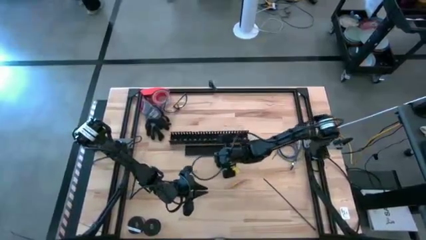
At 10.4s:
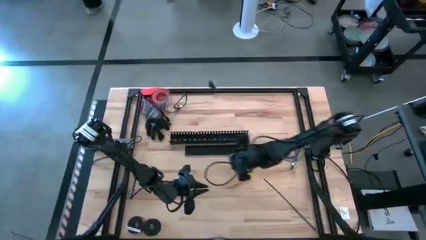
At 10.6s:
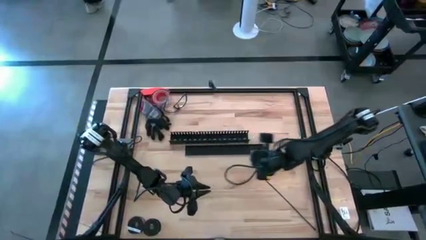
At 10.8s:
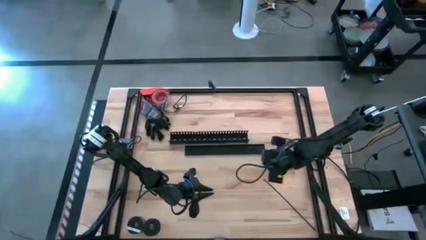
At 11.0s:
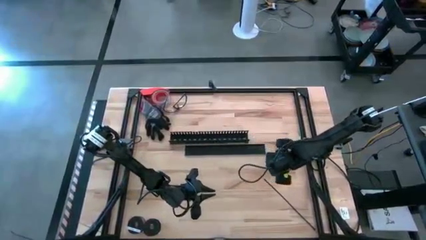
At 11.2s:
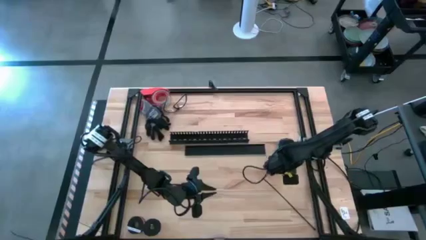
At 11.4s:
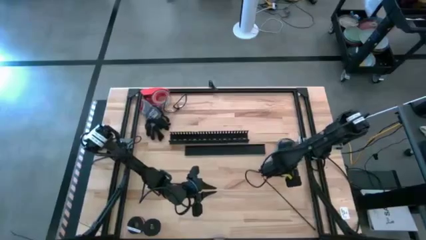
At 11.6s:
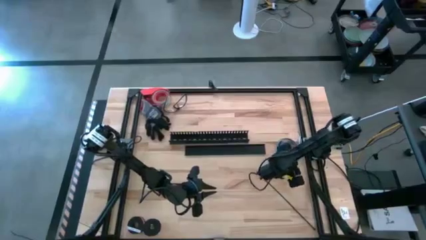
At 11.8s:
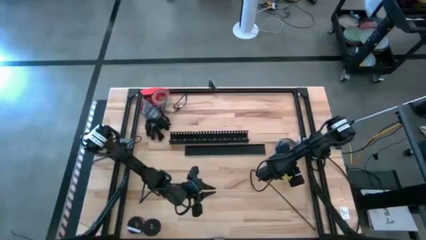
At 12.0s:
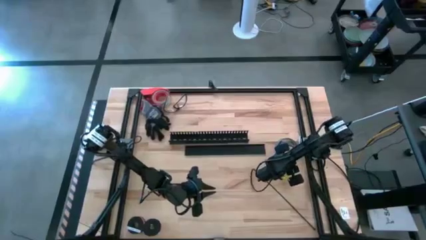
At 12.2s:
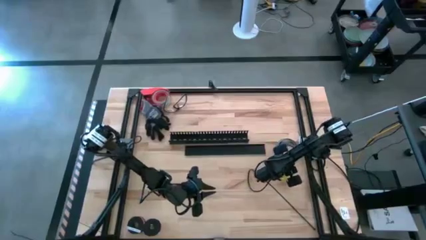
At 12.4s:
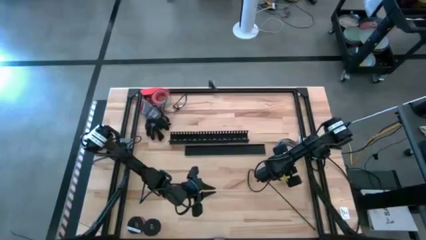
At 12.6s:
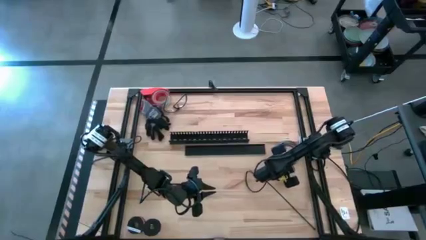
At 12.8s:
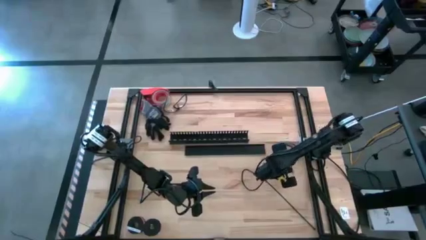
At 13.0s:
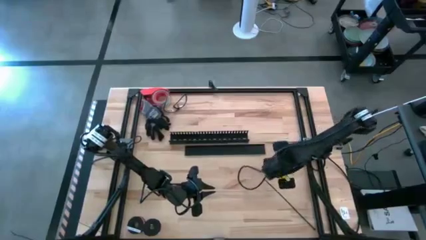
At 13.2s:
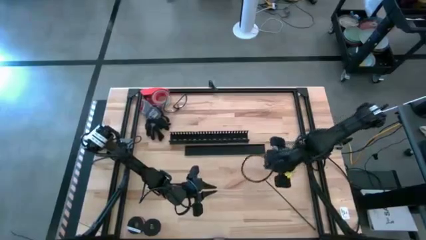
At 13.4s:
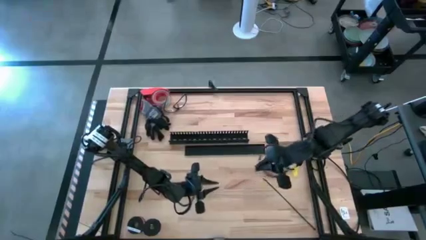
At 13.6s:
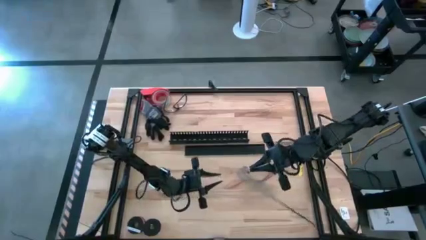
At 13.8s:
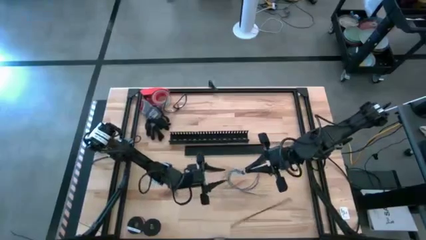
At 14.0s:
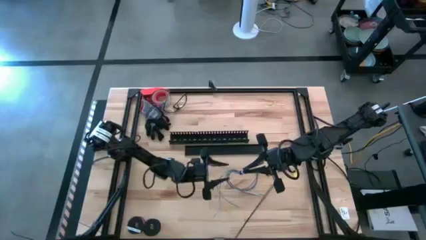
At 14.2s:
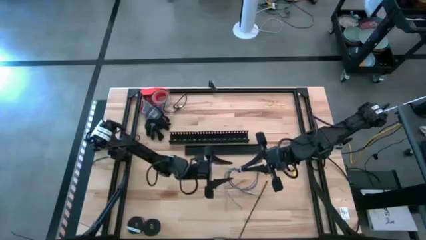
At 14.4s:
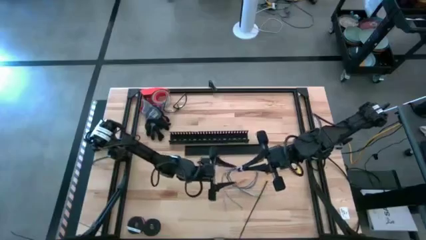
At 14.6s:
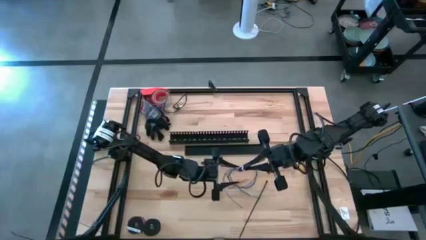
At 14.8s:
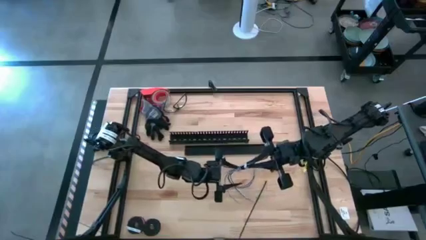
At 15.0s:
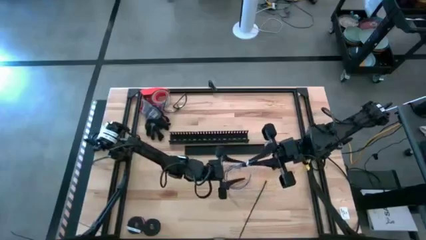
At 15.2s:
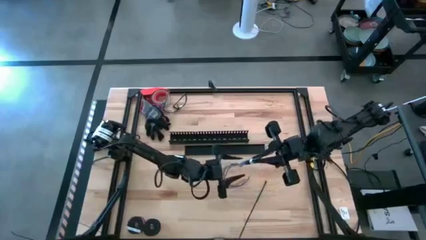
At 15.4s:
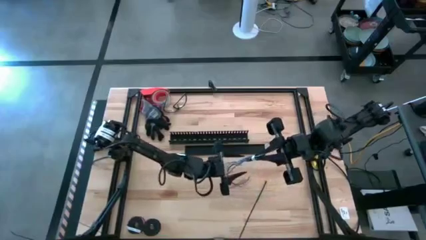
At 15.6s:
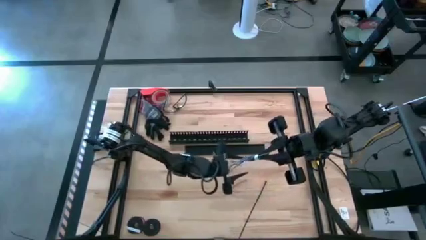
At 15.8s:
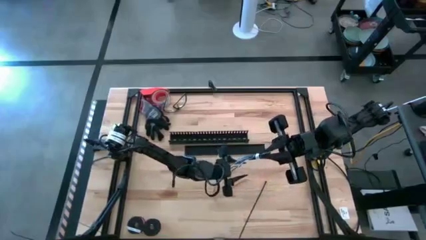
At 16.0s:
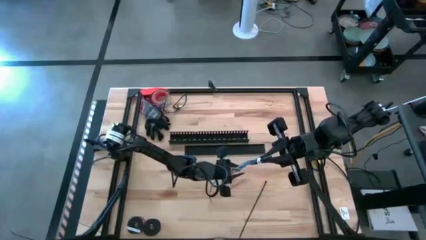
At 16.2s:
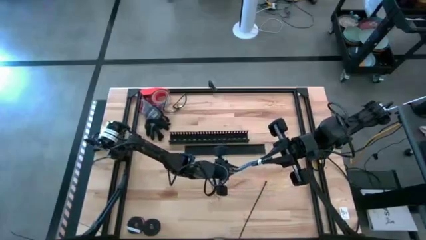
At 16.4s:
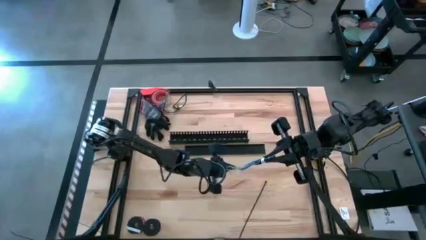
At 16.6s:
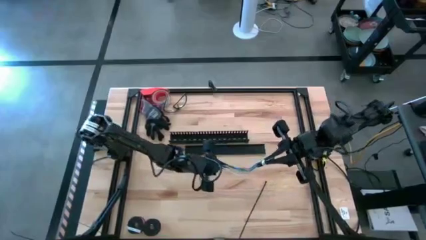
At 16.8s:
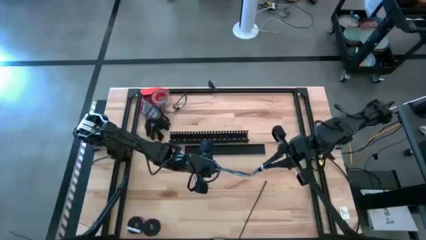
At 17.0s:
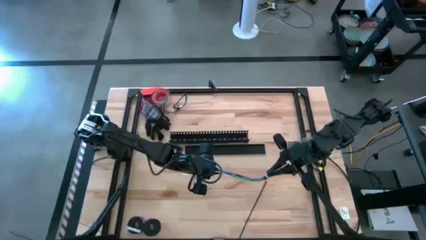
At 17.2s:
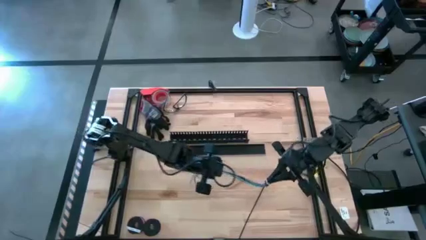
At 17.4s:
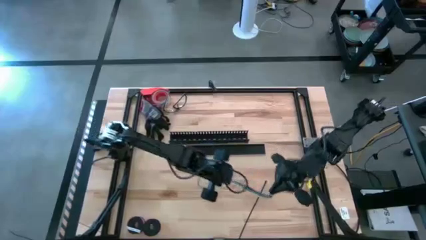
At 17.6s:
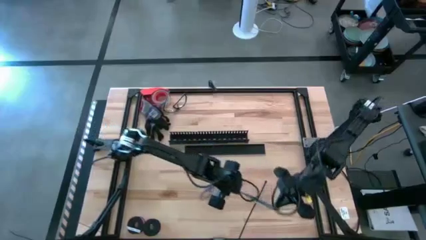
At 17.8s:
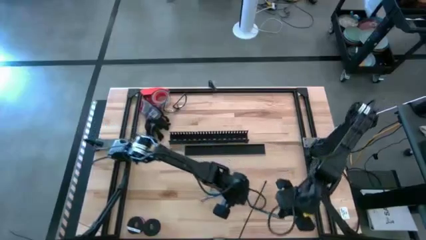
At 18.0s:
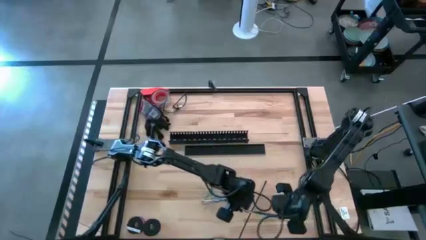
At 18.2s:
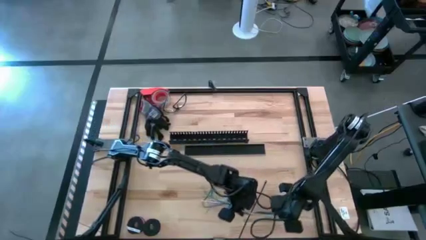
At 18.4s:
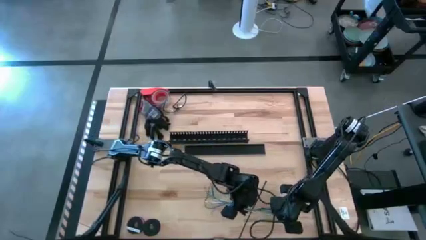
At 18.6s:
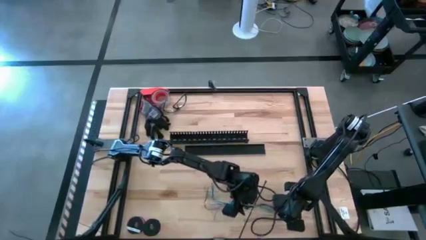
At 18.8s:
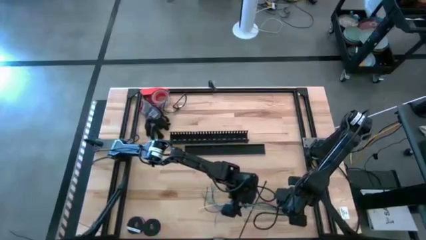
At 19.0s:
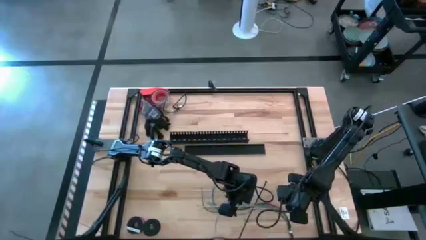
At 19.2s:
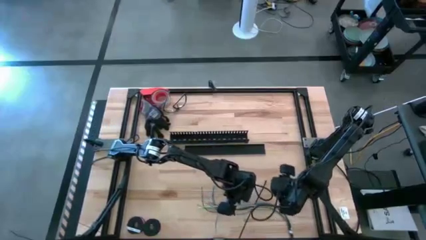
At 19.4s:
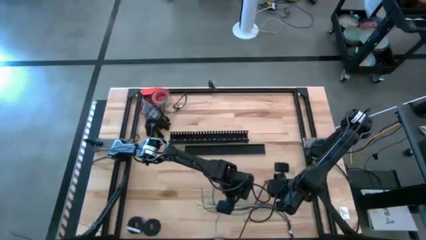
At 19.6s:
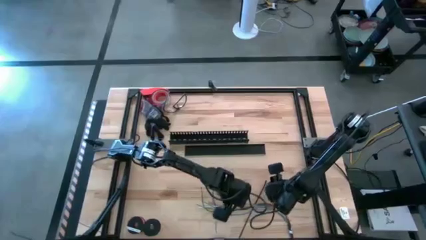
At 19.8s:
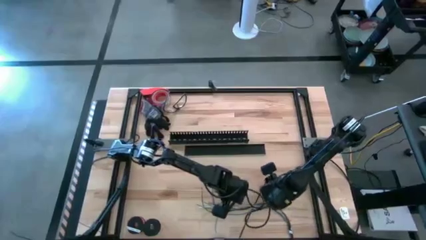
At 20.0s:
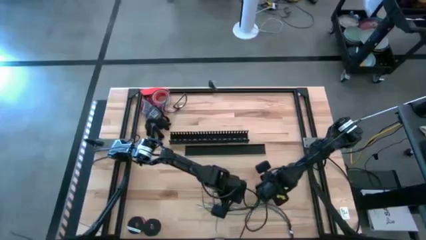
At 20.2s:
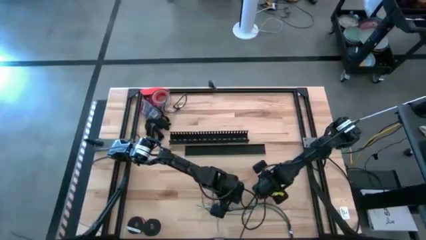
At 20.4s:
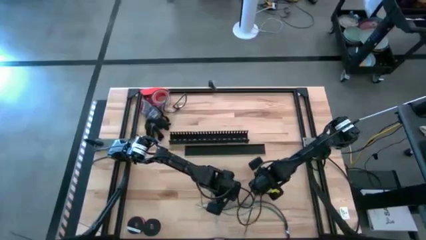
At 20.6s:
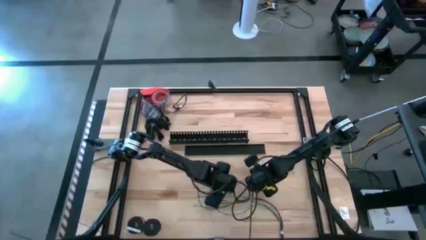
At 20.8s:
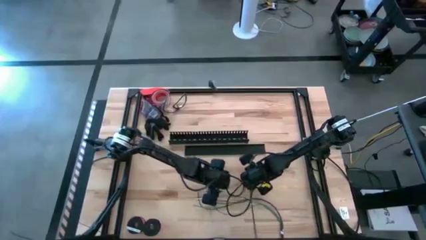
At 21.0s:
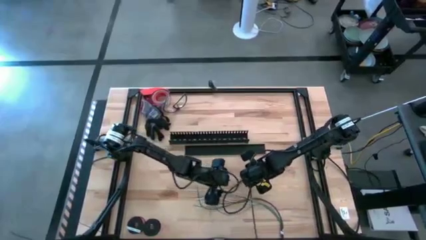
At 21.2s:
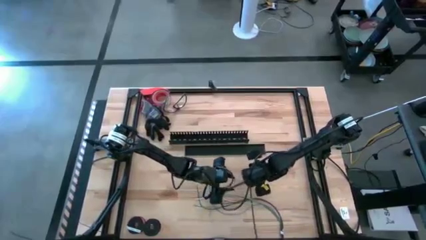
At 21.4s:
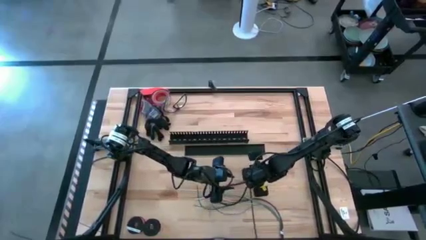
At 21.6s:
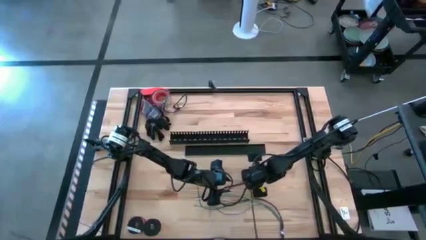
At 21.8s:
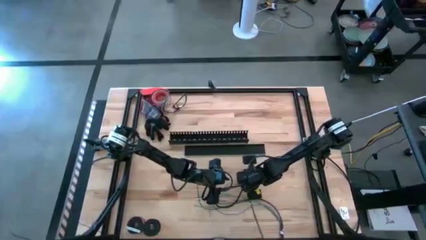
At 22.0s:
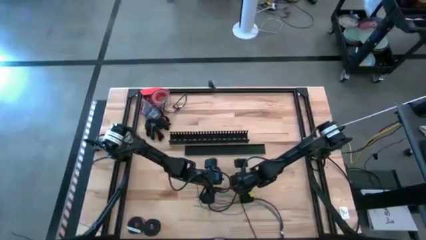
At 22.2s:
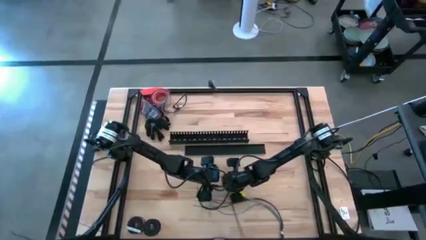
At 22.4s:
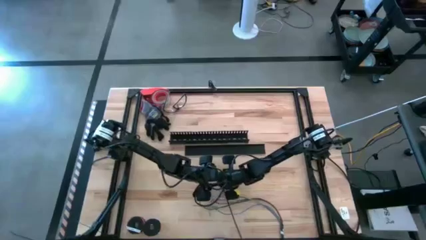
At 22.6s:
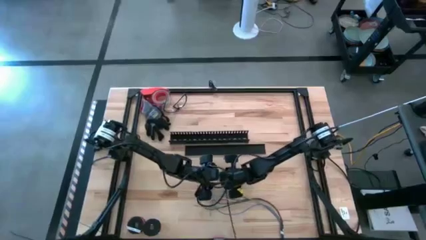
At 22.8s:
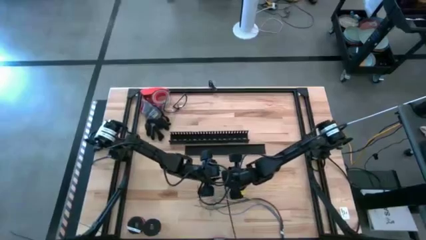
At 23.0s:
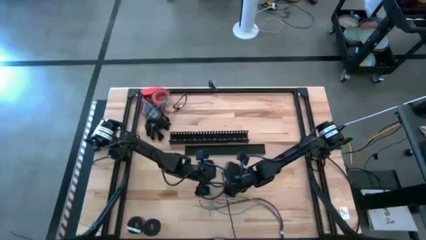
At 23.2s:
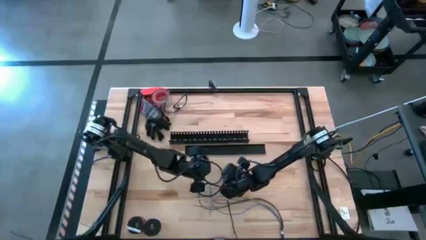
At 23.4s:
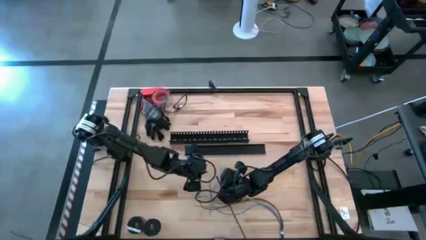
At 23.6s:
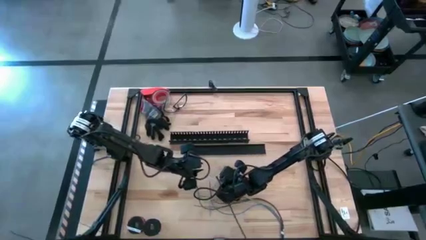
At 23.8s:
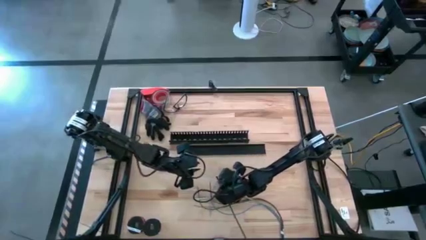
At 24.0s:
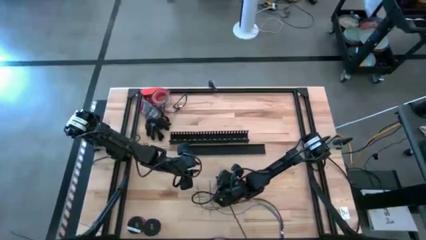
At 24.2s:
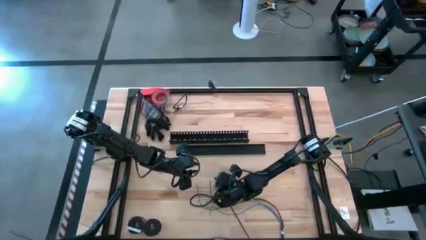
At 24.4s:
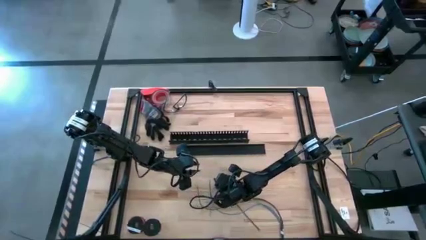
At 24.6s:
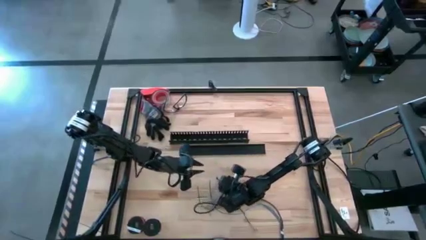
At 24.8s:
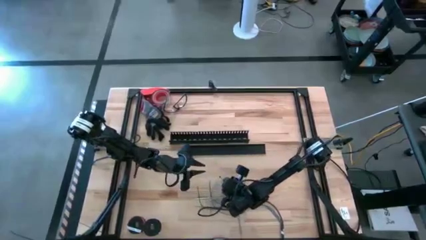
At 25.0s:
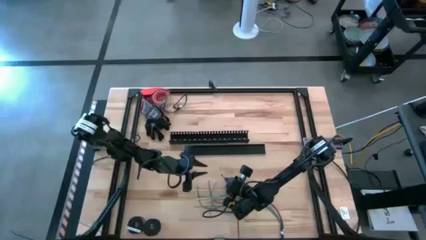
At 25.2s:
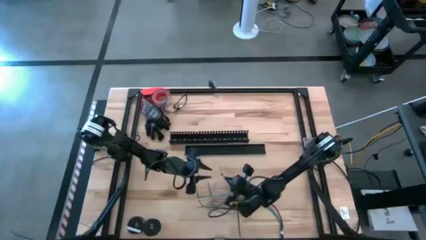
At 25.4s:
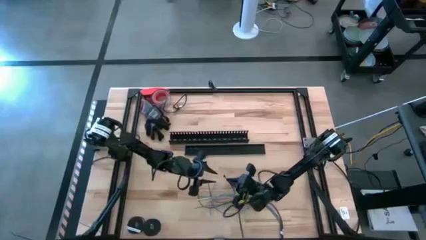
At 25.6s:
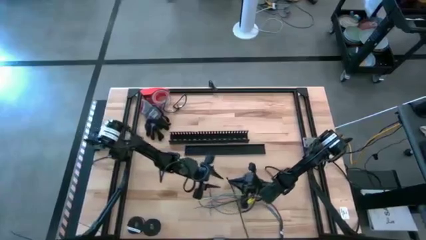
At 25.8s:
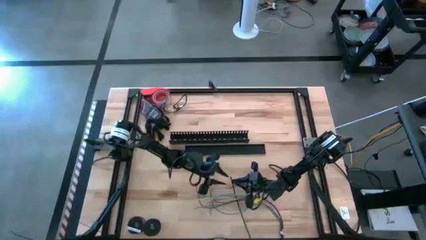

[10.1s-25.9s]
Task: Ziptie cables
Wrap the cable wires with the black zip tie

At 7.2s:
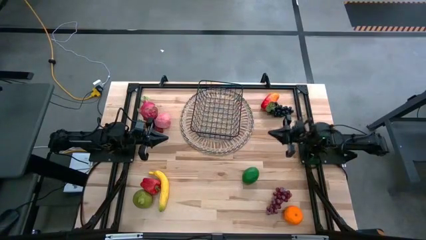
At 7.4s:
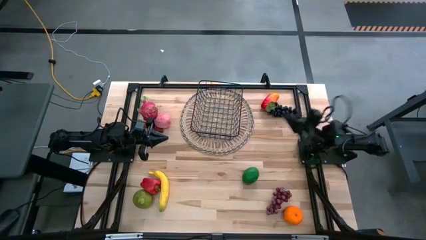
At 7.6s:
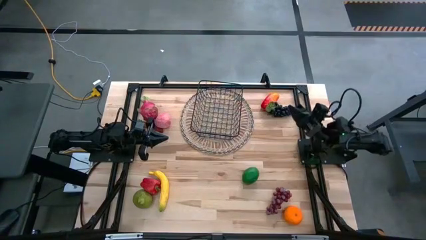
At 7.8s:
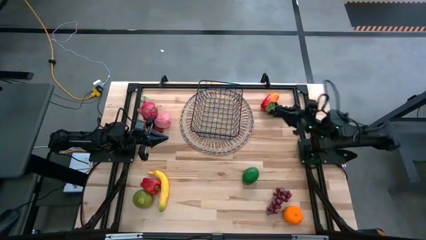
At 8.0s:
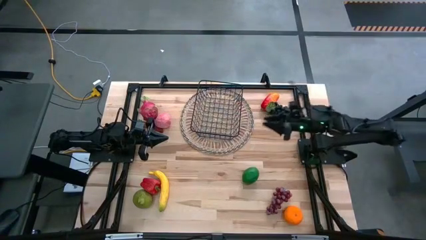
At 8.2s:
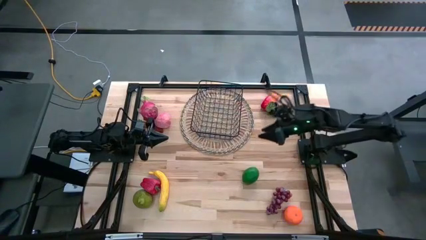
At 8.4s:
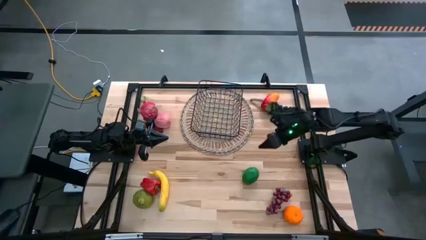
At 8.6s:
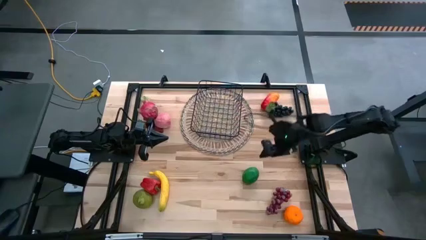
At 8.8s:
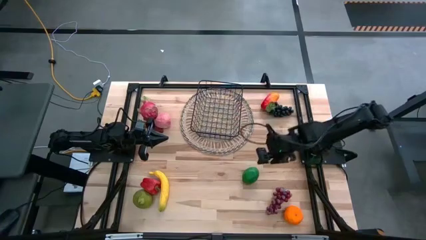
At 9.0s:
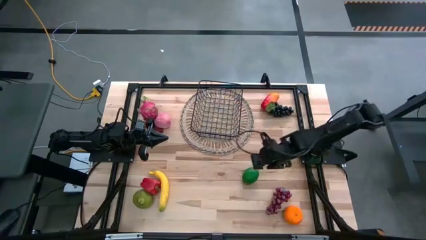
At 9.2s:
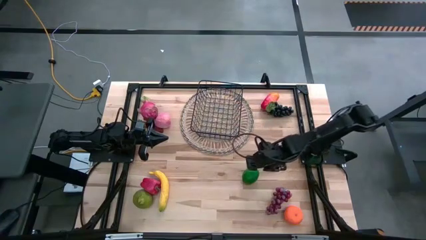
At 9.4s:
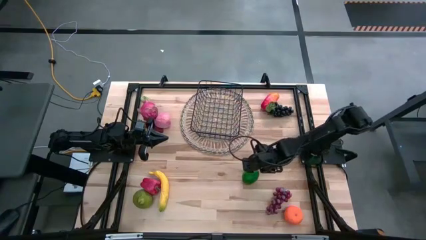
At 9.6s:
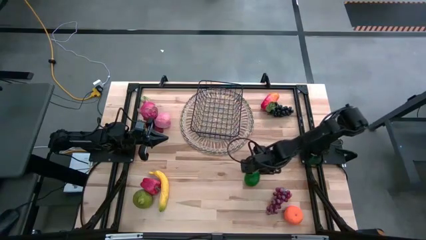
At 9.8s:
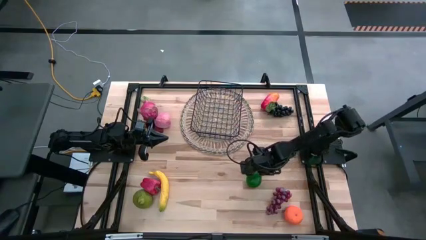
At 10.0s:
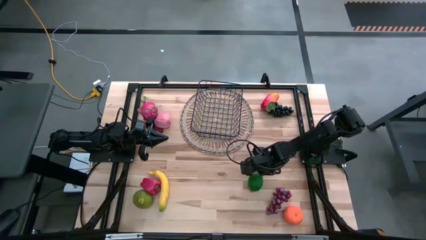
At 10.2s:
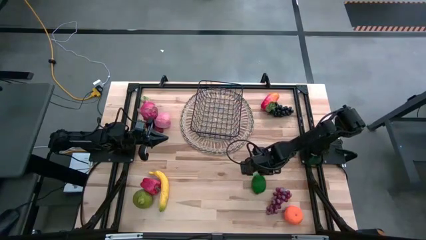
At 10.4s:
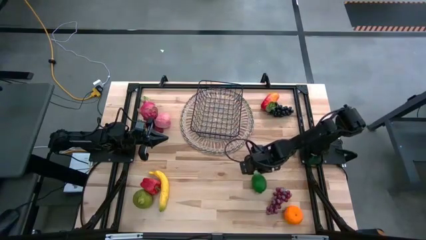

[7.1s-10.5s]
Task: Build produce basket
Put the green lime into the black wire basket
